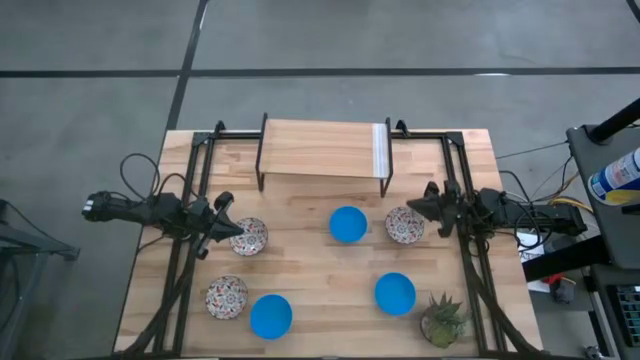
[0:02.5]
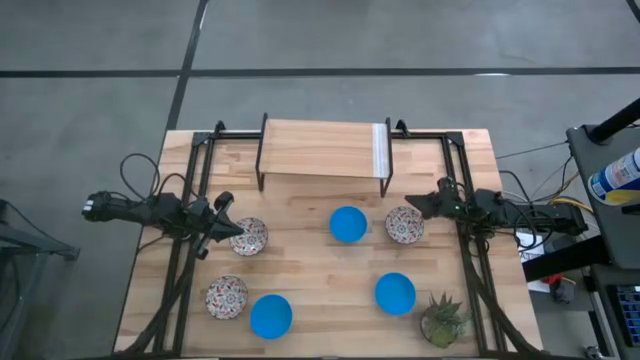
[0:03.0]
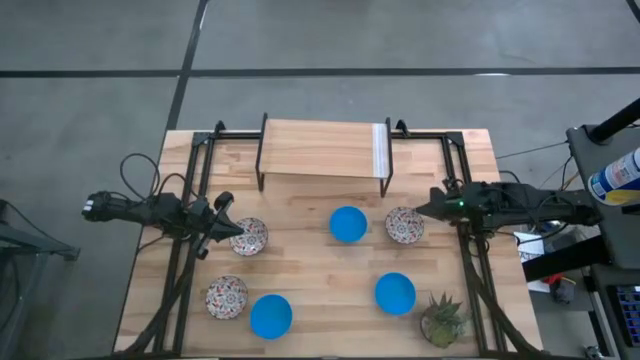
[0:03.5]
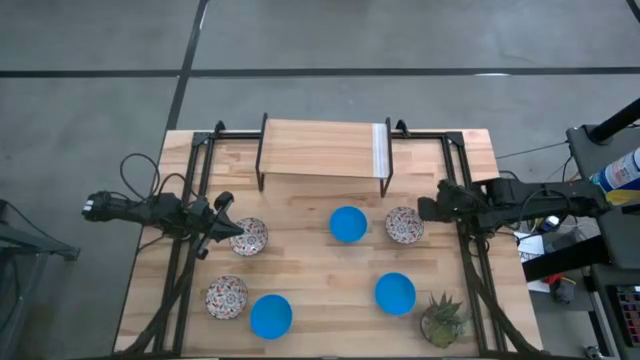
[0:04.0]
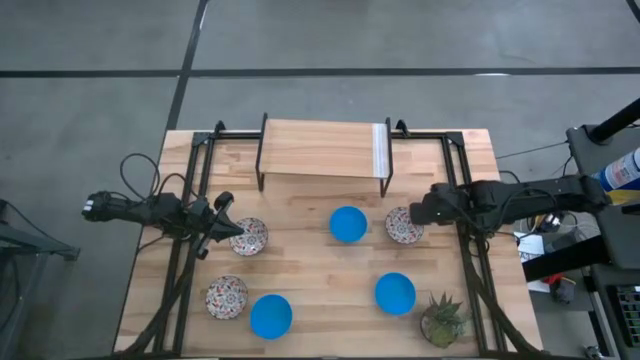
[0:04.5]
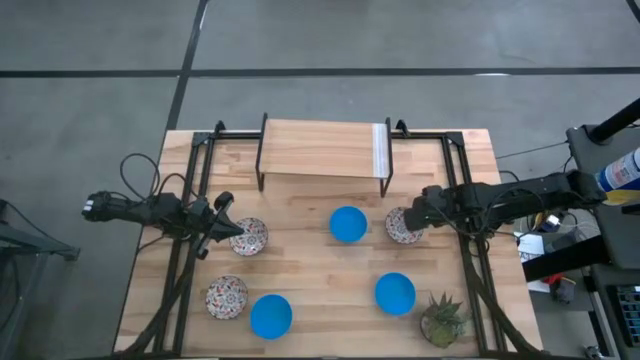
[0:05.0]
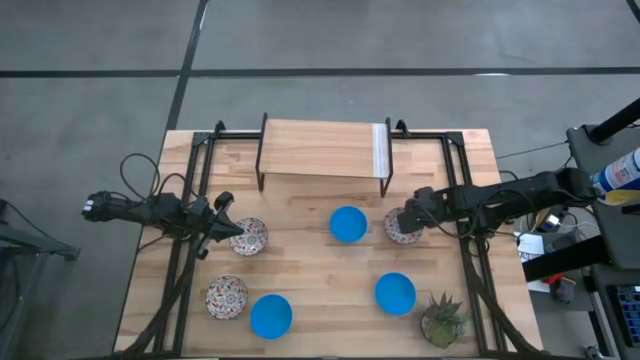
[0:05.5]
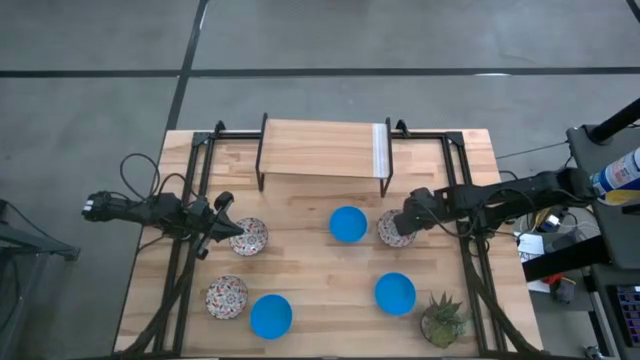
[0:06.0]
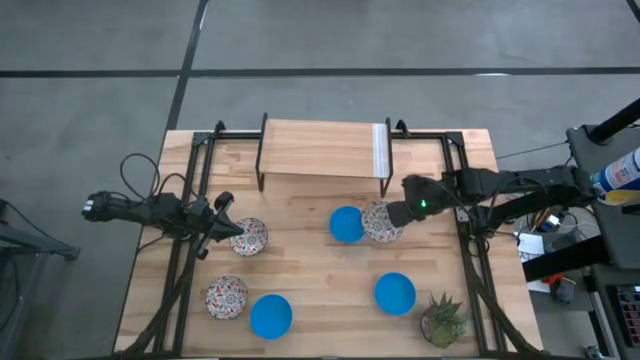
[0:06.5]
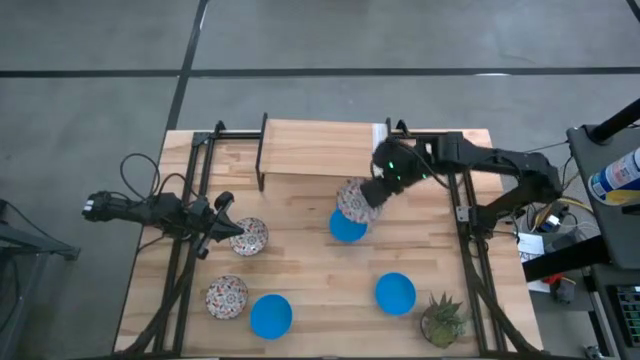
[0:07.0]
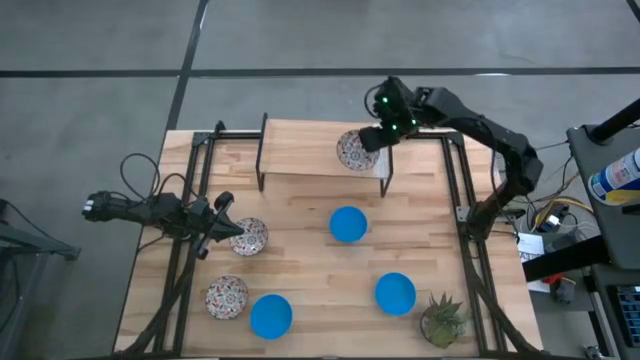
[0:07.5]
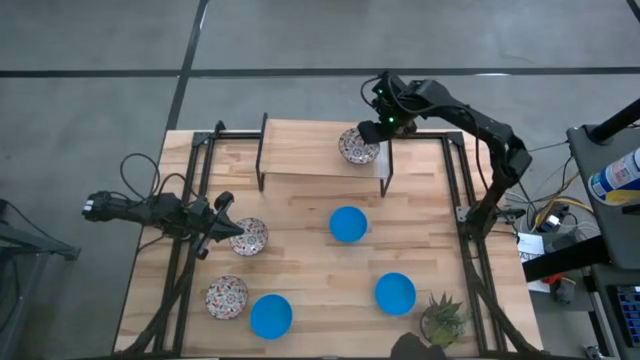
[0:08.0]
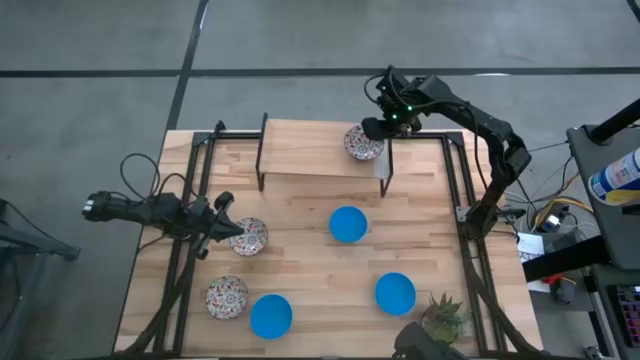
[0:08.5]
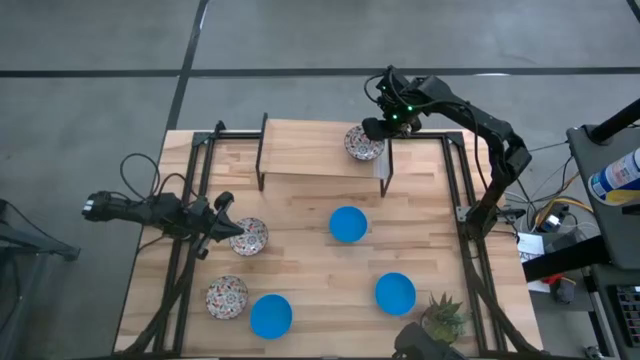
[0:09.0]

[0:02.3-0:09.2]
Task: Pick & Place Mini bowls
Put the top right white bowl on the shelf

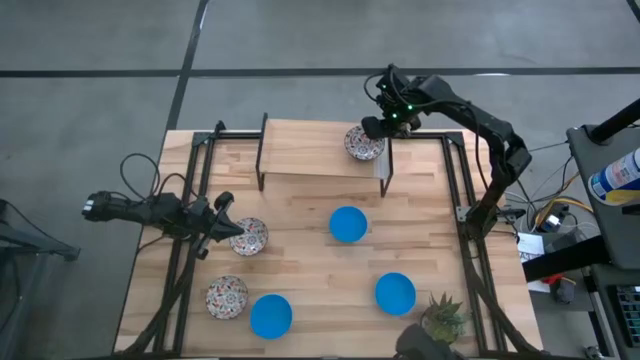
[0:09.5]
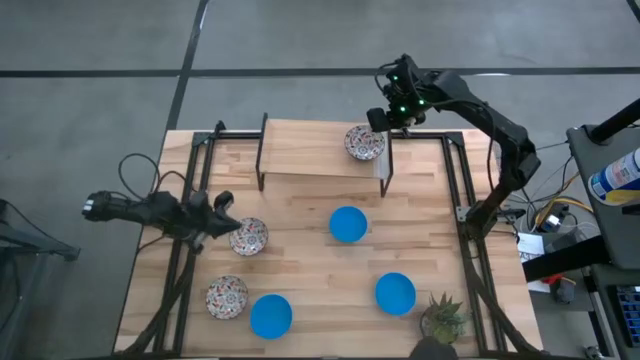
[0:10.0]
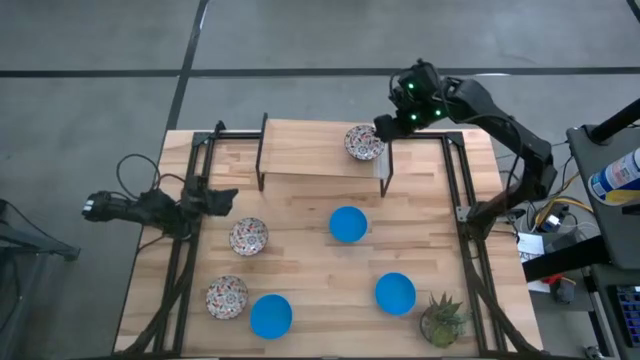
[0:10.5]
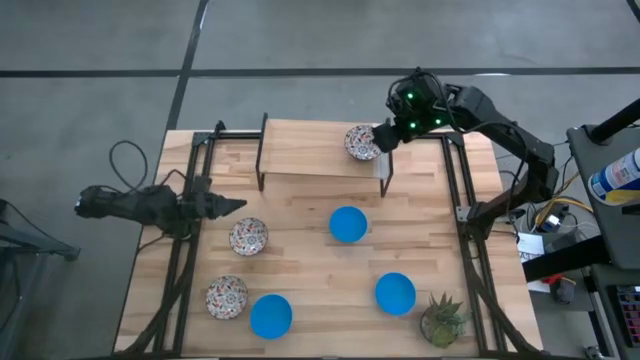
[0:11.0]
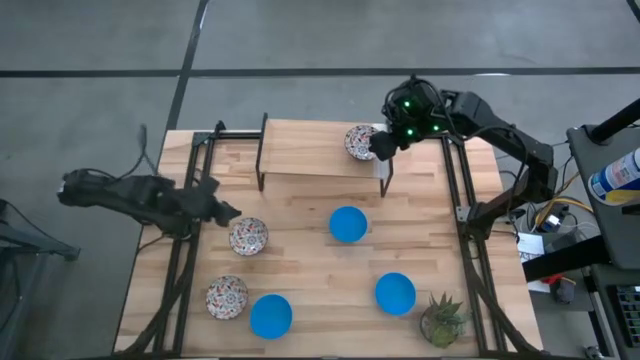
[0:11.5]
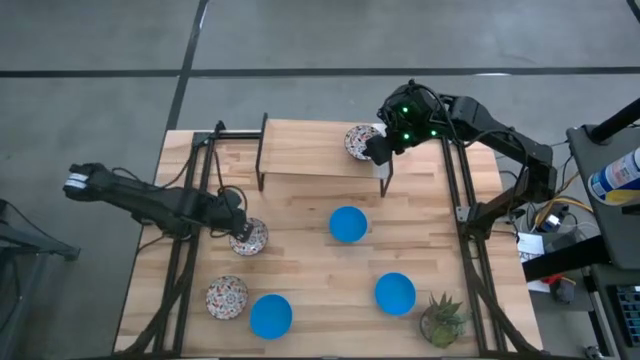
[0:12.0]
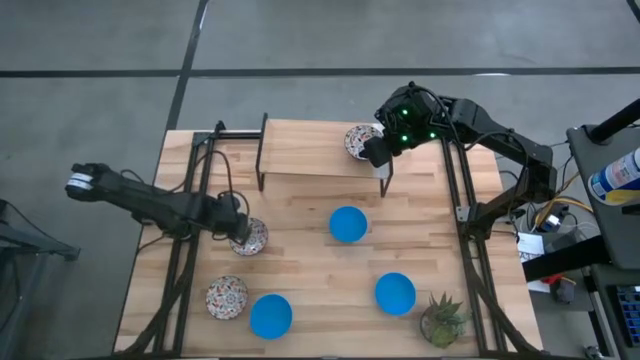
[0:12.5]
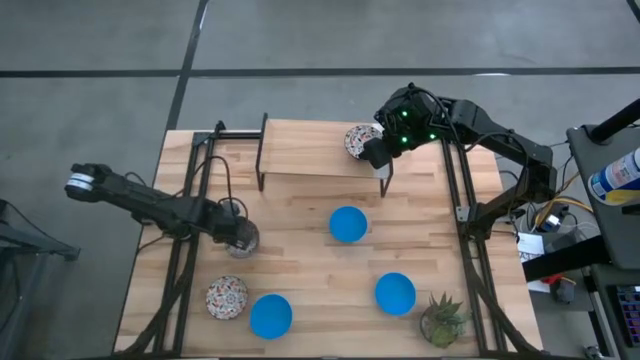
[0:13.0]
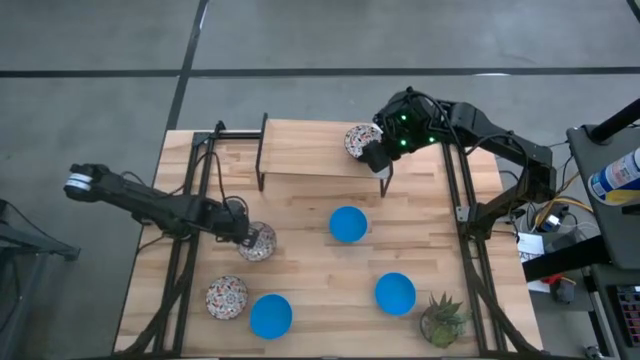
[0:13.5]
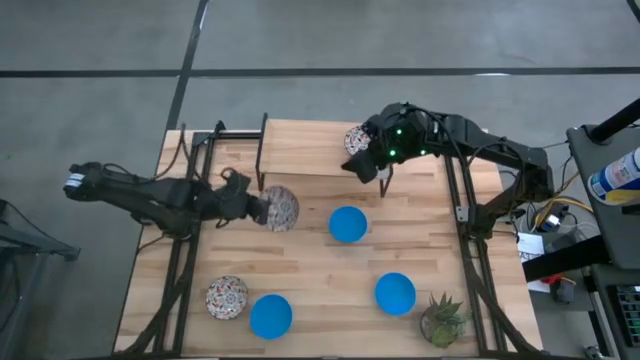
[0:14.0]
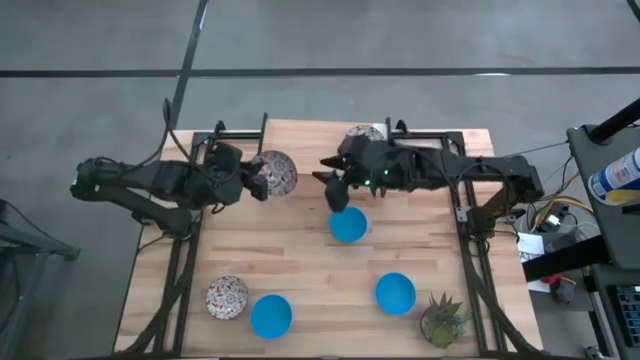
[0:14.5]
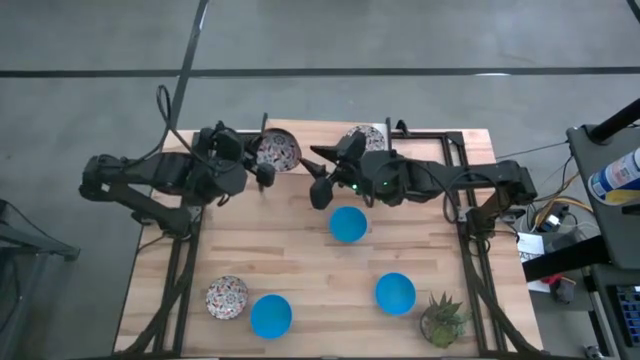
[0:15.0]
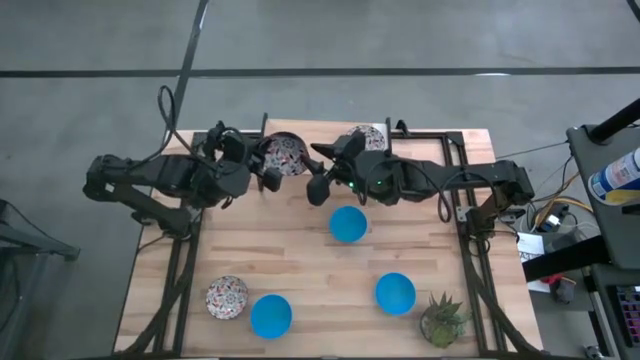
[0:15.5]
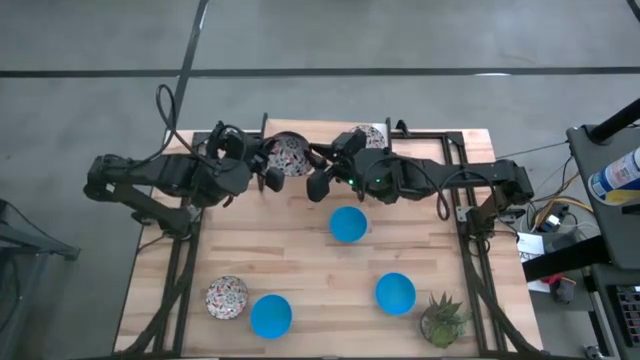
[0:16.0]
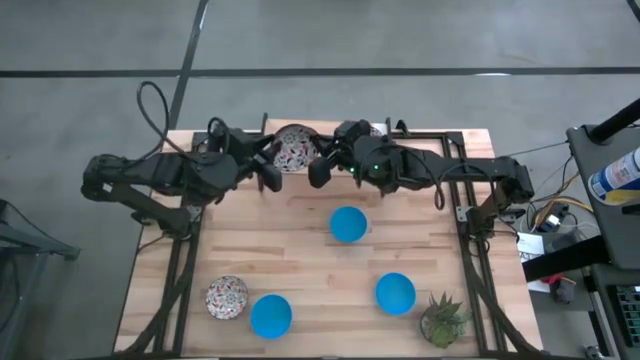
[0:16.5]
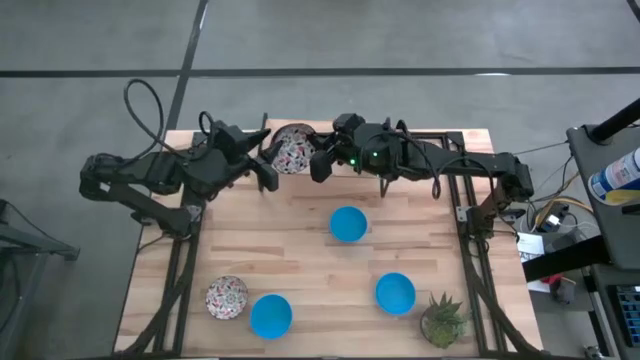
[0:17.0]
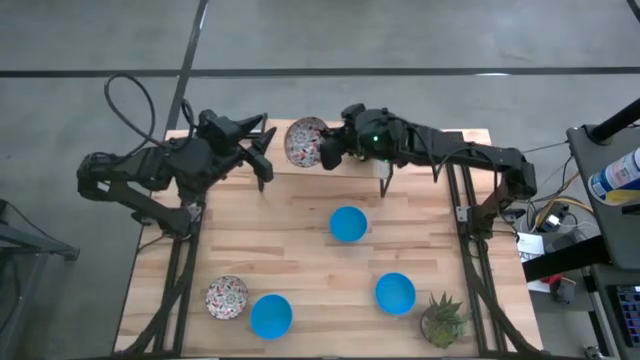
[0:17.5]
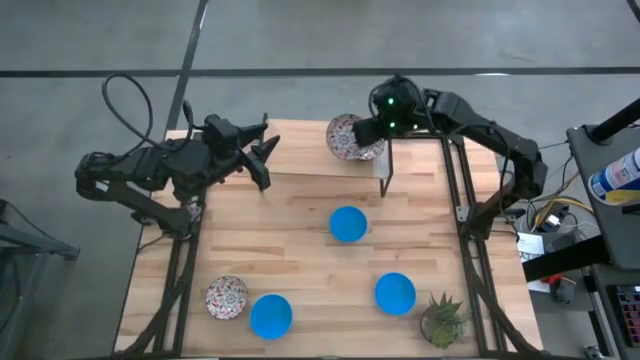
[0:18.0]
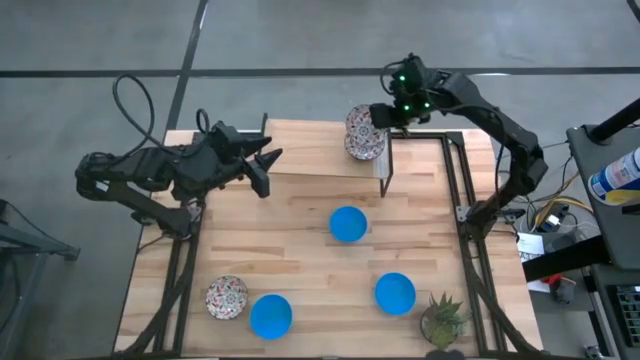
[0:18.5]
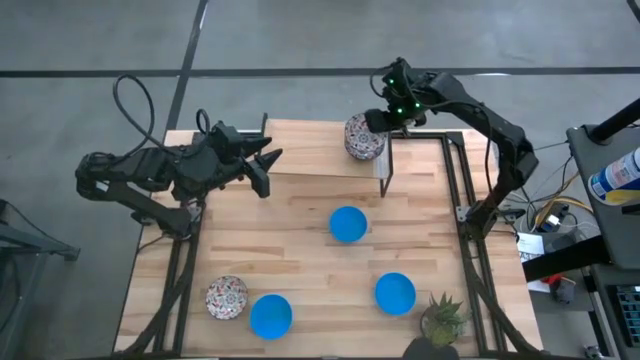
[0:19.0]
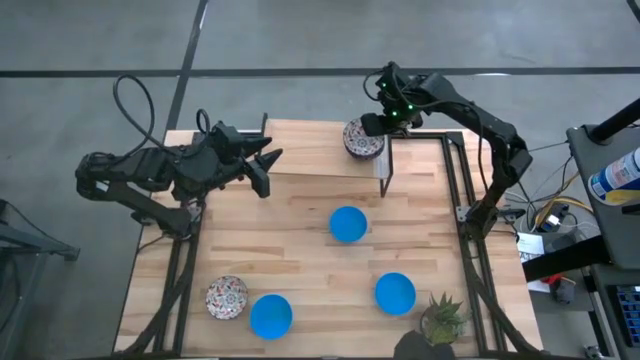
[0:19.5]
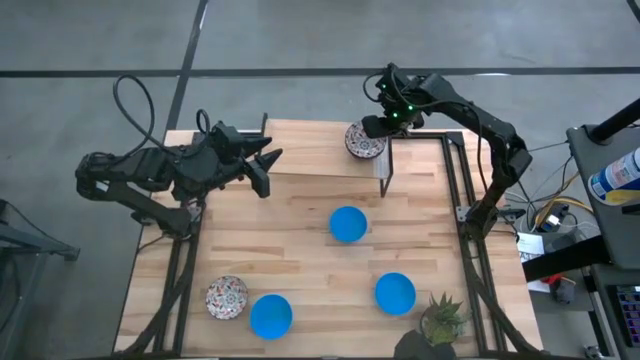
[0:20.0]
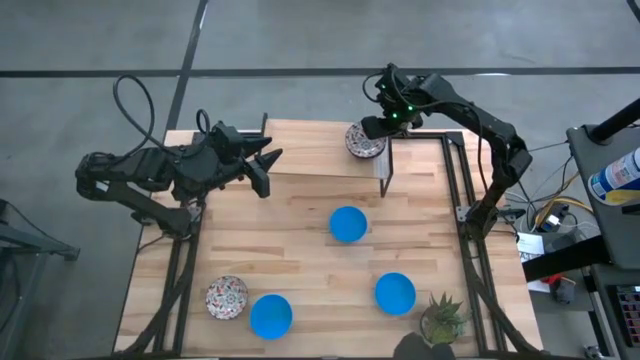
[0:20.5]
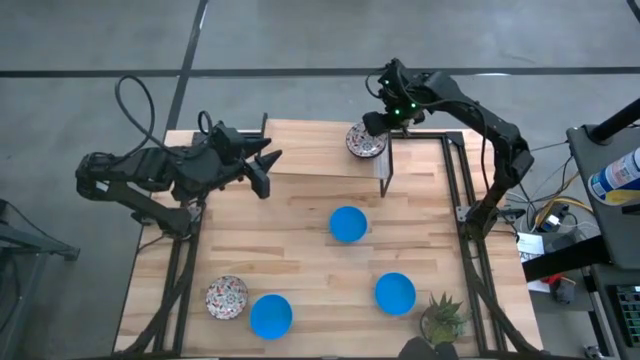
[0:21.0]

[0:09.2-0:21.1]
Stack the top white bowl on the other white bowl on the shelf

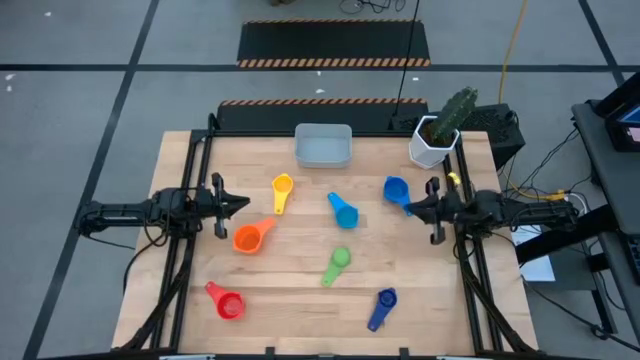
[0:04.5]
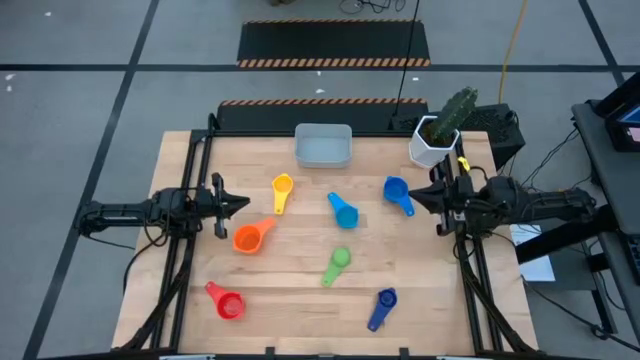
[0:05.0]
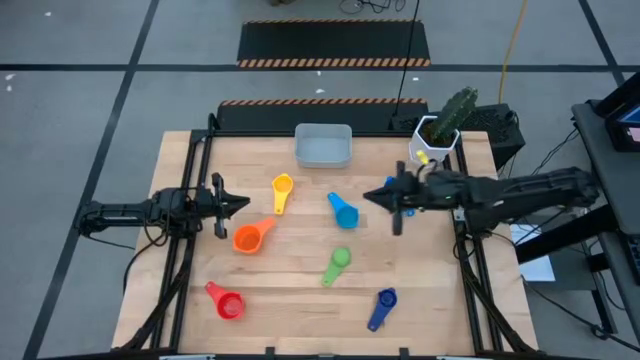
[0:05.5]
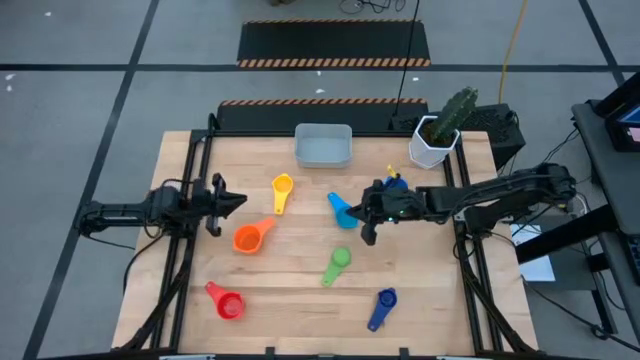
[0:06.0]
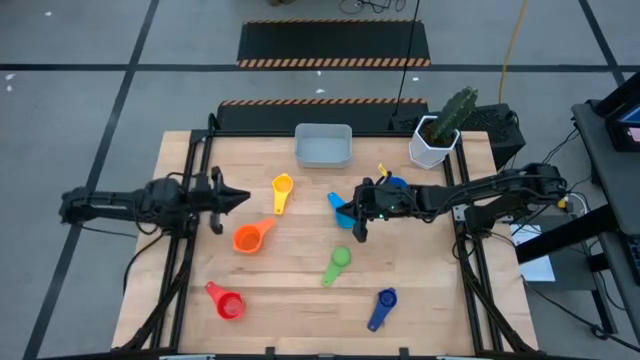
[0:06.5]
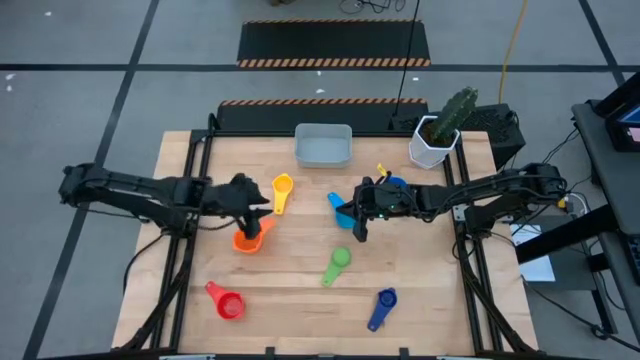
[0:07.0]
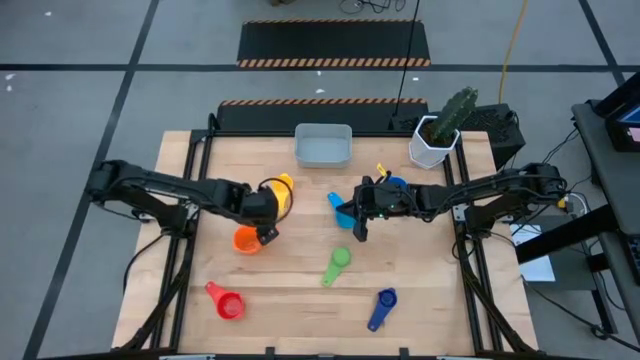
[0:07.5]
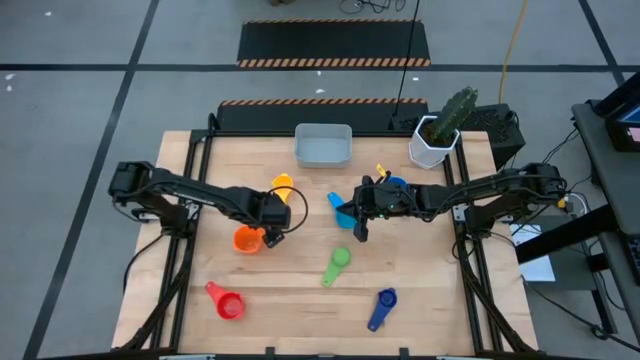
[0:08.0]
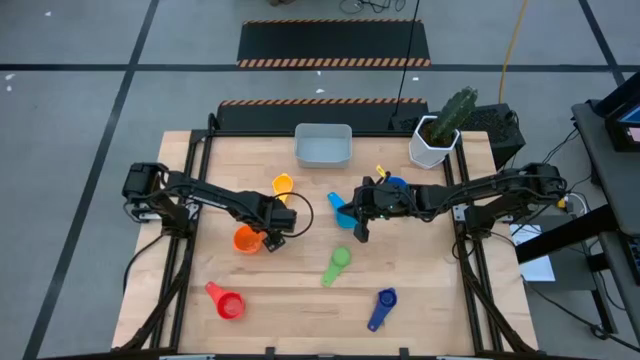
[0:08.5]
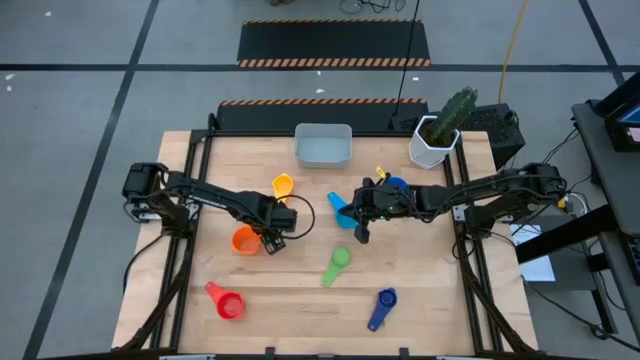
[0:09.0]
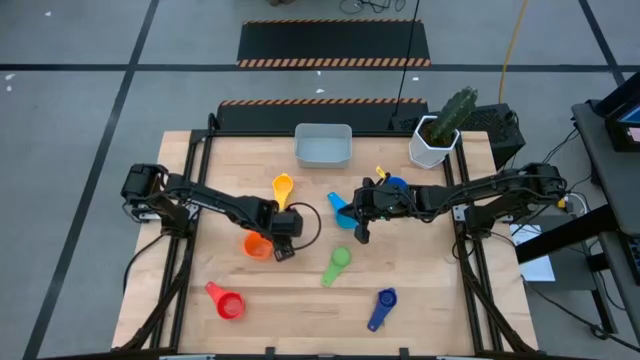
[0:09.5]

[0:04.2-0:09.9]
Task: Nest measuring cups in basket
Adjust the orange measuring cup
